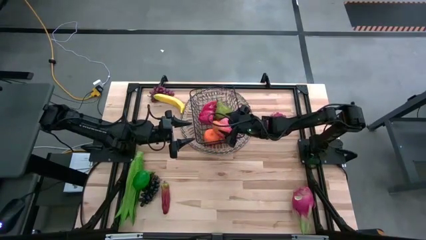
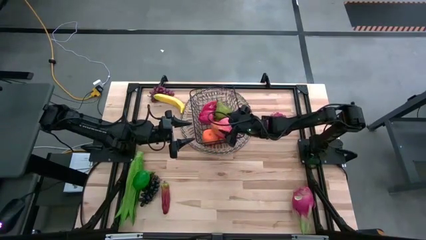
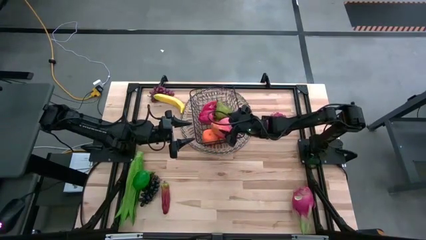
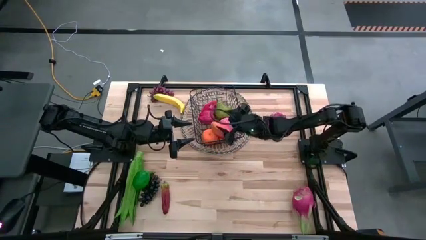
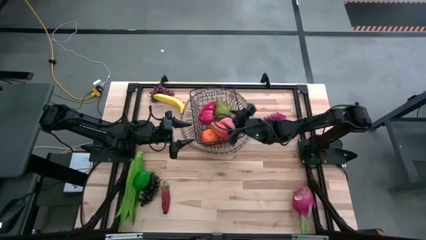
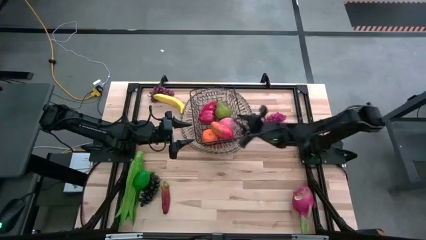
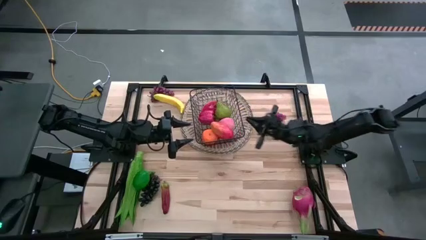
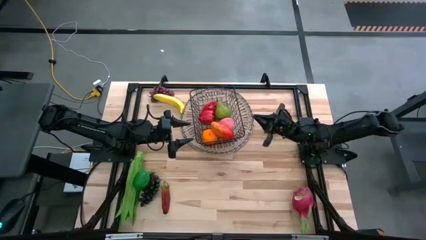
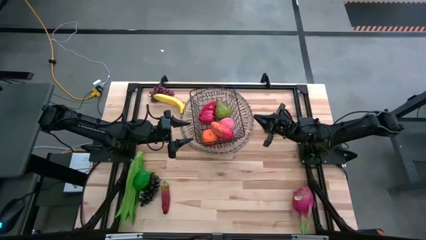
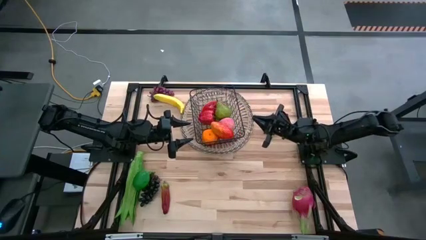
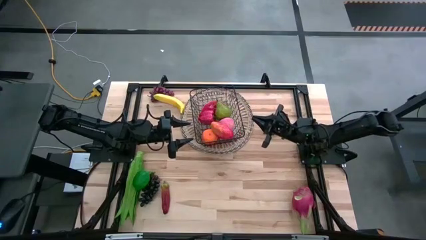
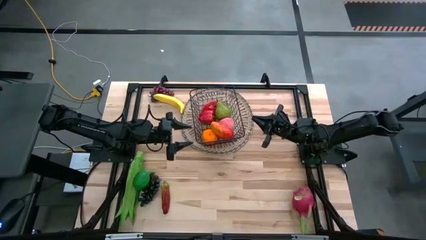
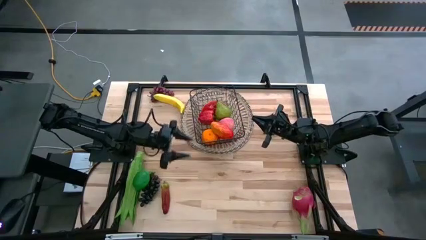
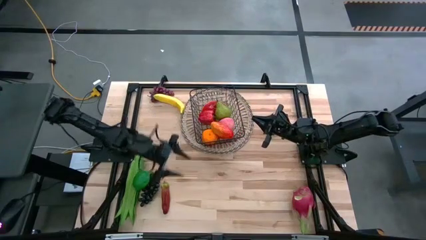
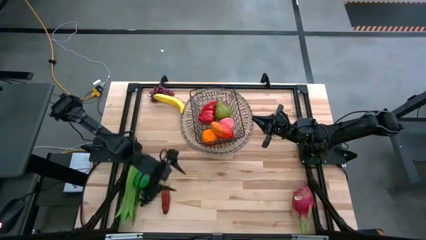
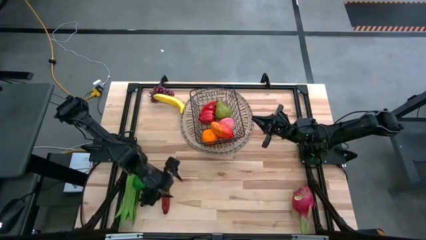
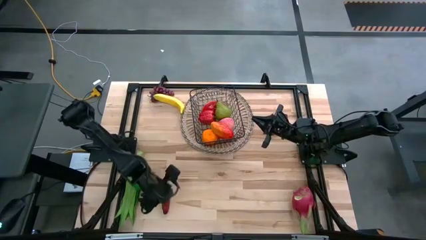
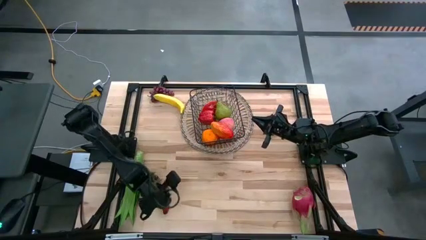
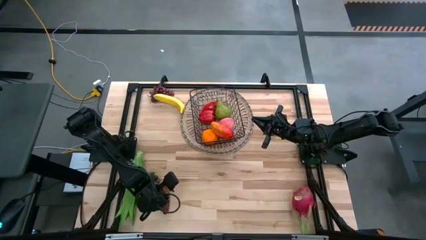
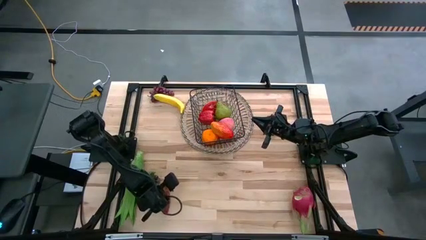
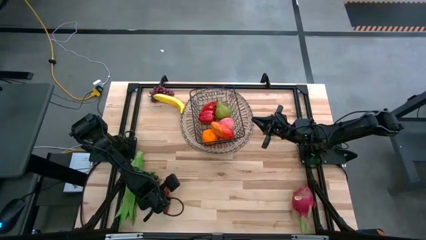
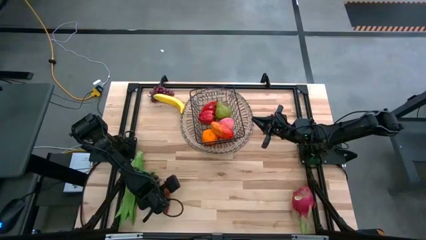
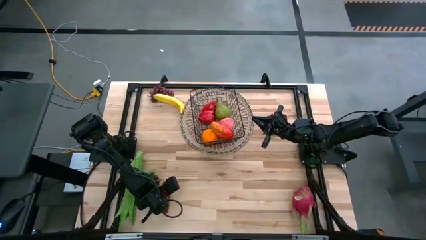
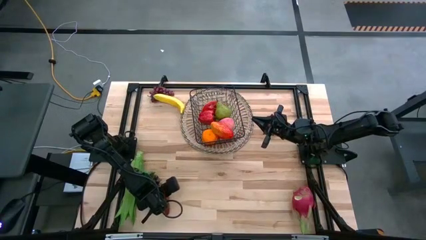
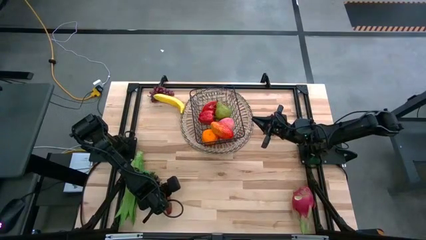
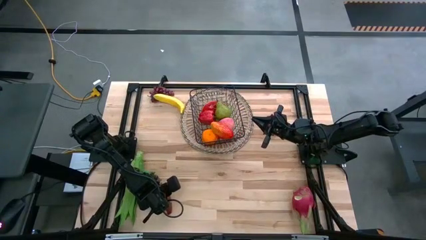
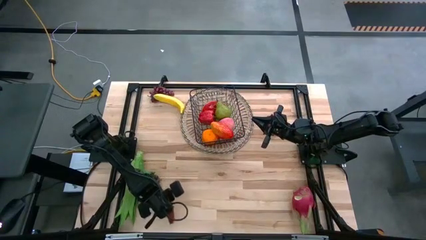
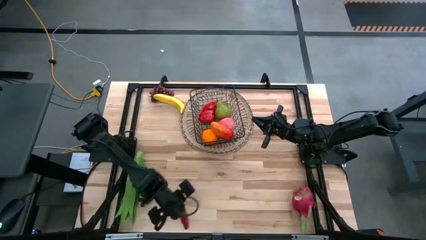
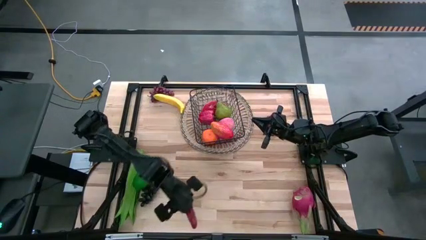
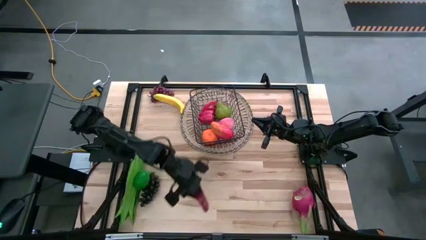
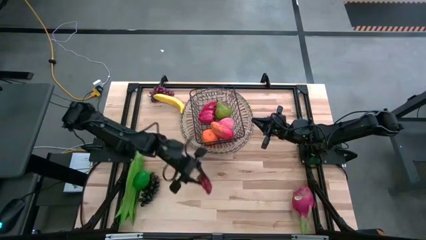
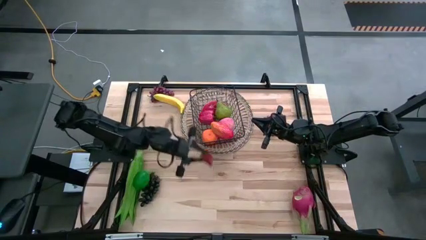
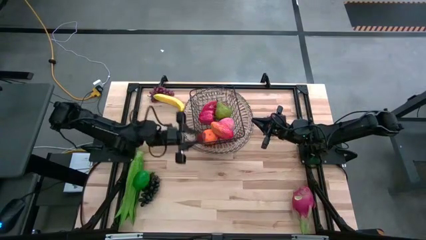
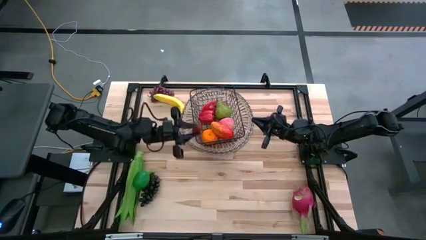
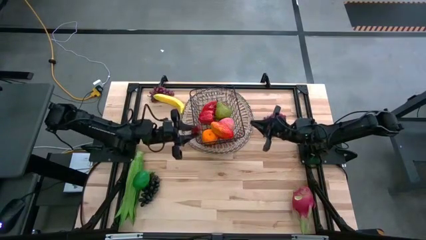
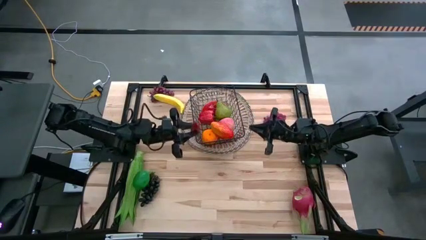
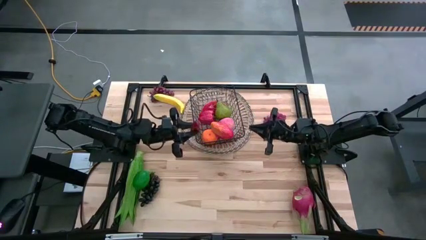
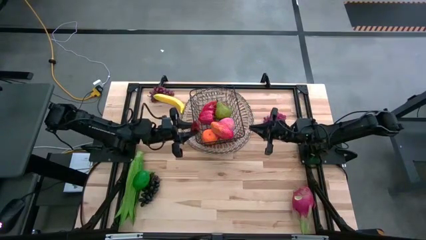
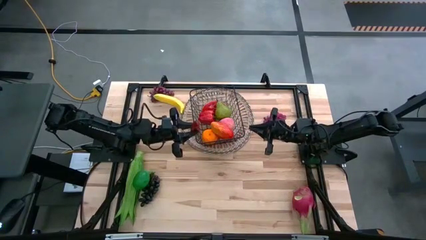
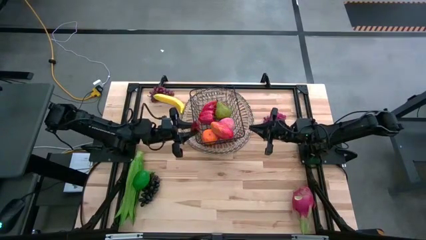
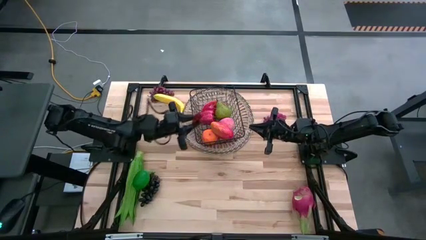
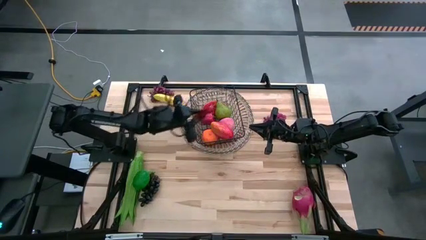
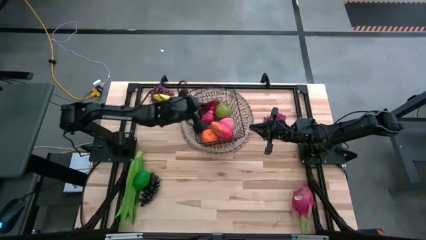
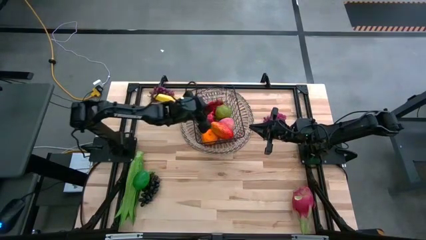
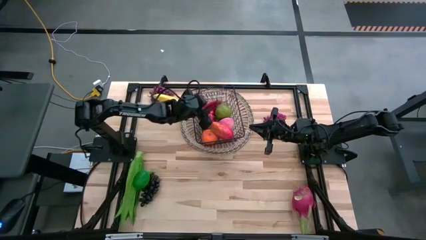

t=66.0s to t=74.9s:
Task: Build produce basket
Put the red chili pepper into the black wire basket

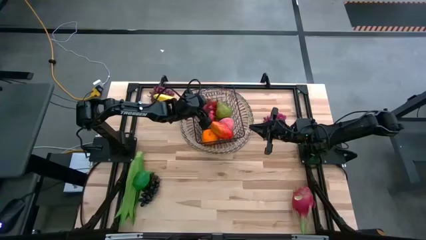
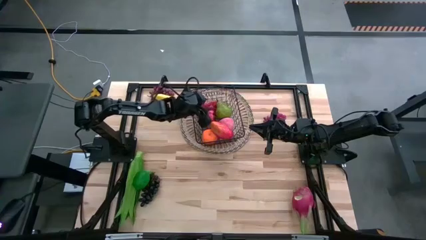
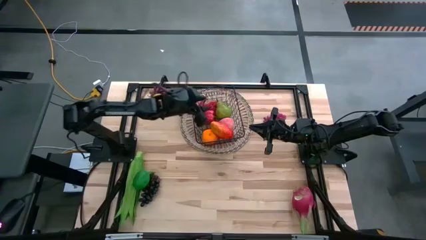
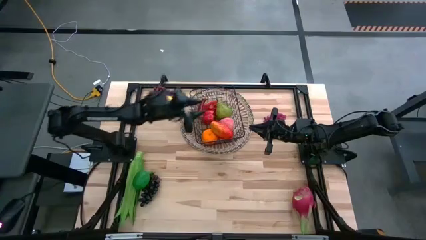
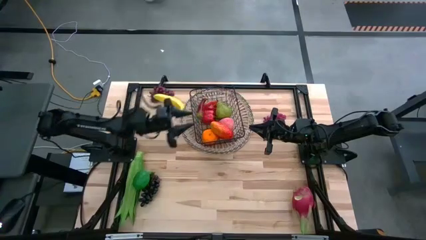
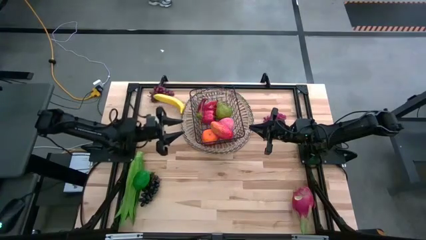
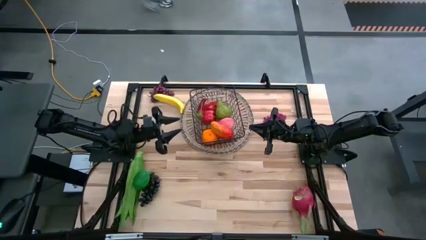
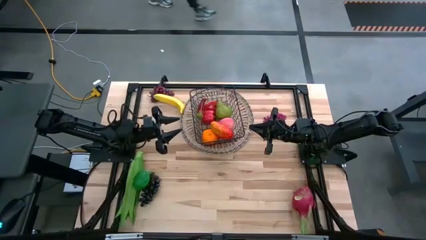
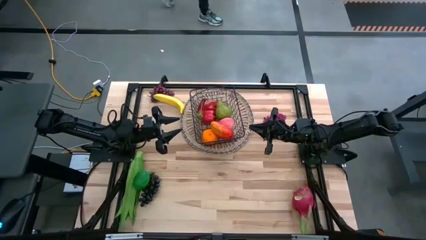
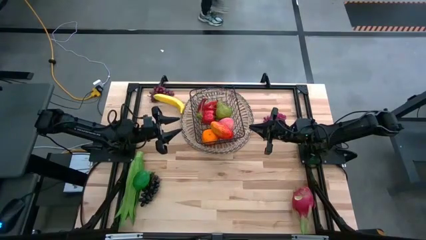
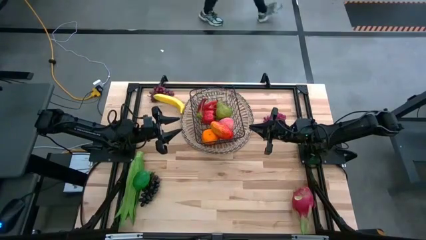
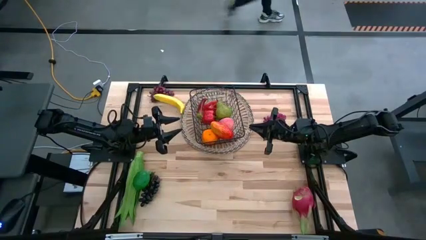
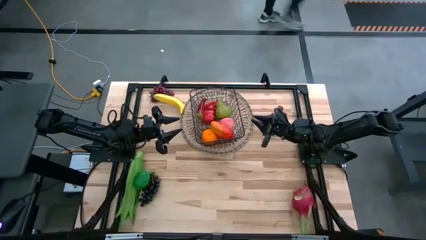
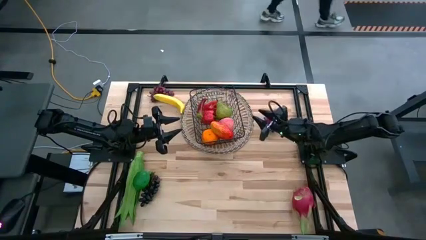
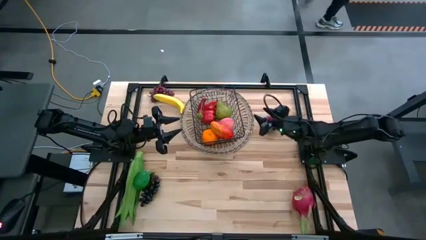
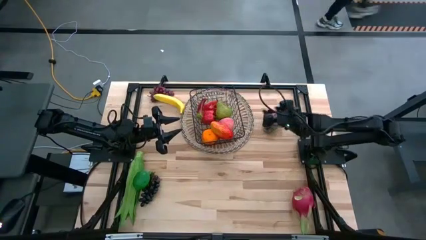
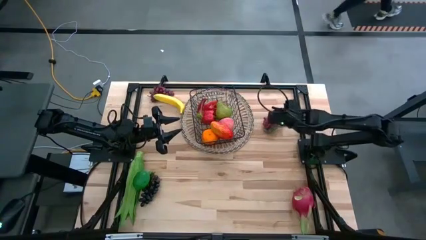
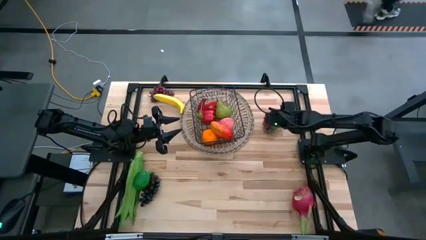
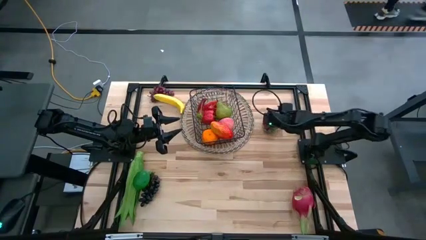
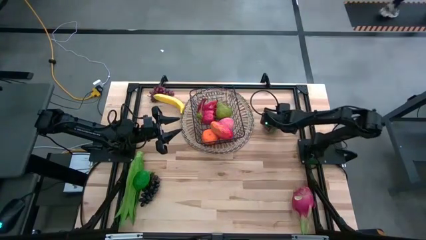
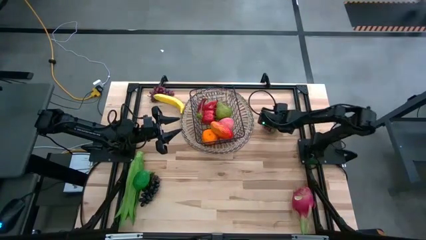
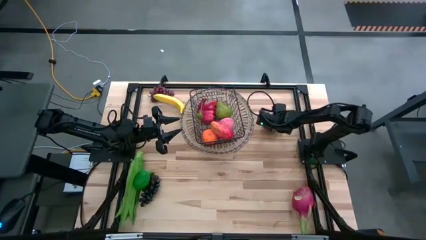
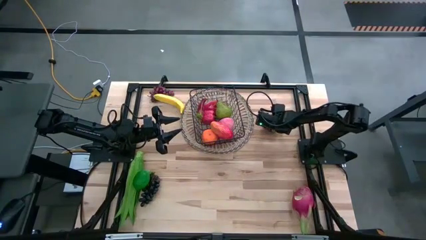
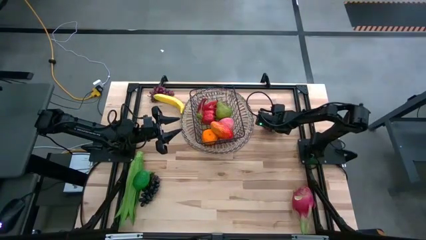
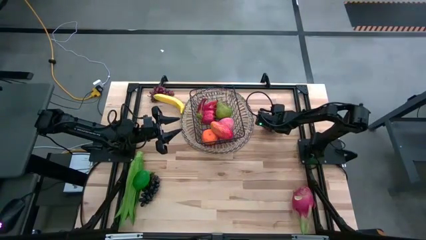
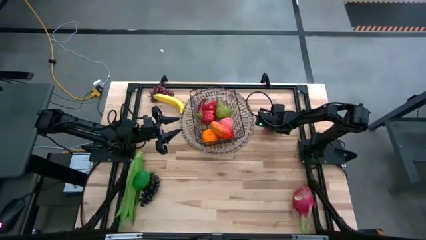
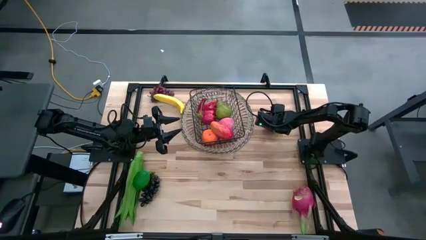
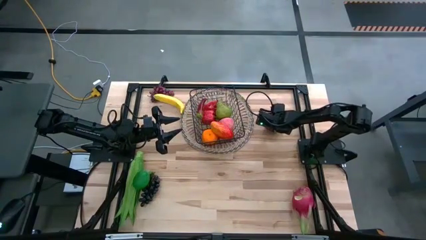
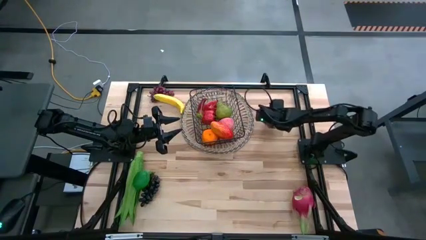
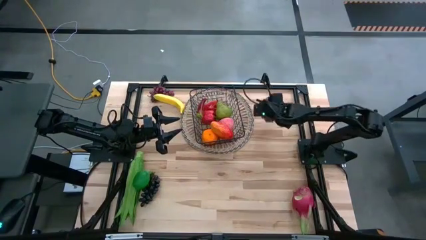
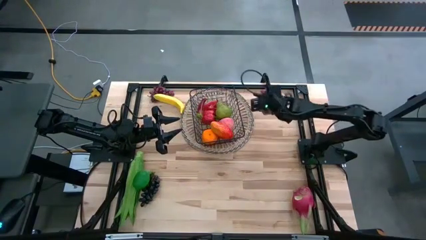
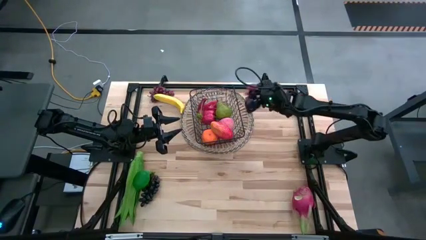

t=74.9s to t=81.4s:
Put the top right purple grapes into the black wire basket
